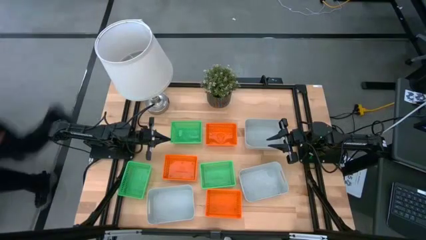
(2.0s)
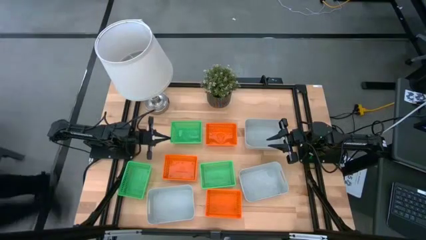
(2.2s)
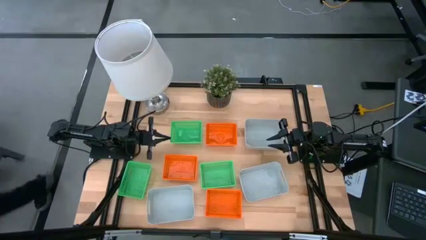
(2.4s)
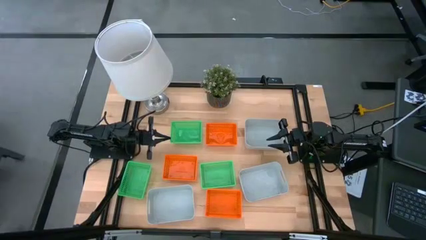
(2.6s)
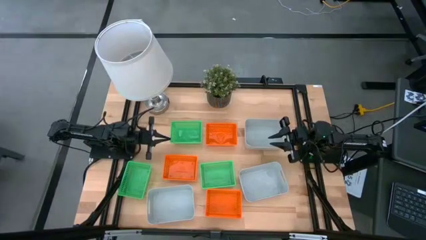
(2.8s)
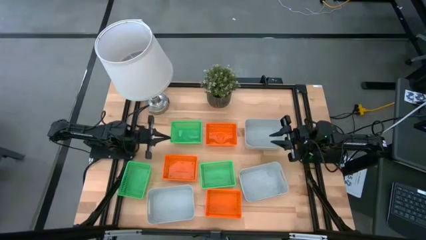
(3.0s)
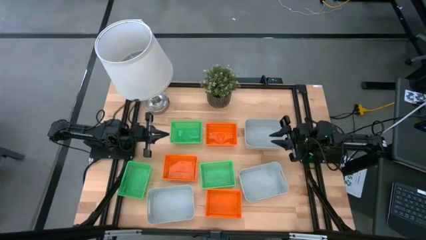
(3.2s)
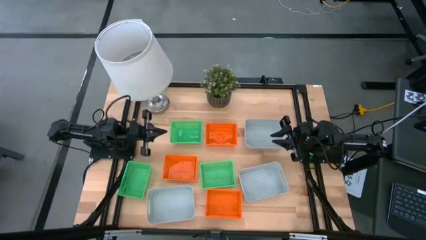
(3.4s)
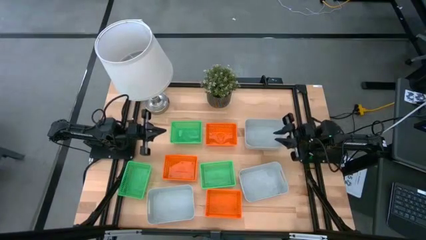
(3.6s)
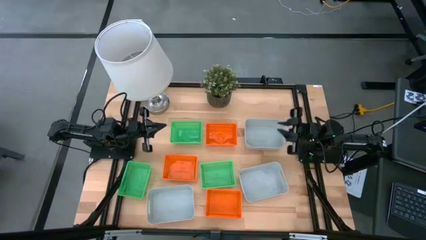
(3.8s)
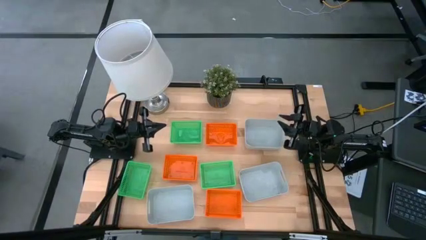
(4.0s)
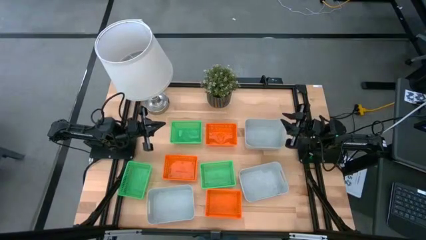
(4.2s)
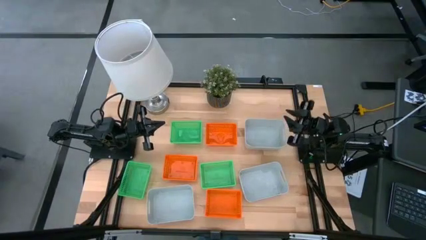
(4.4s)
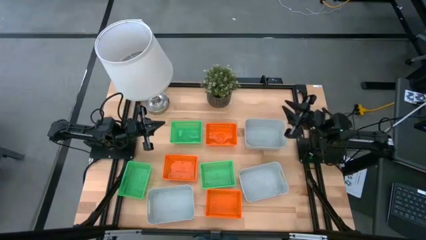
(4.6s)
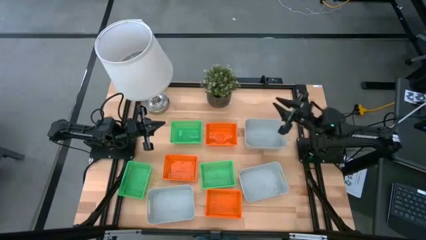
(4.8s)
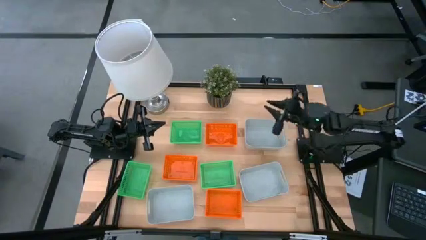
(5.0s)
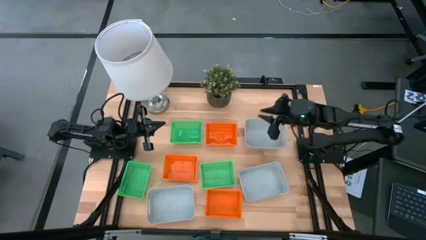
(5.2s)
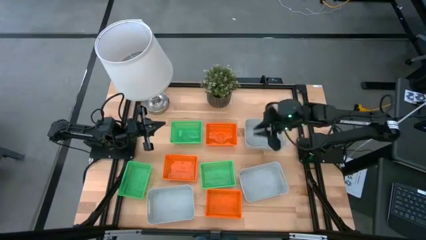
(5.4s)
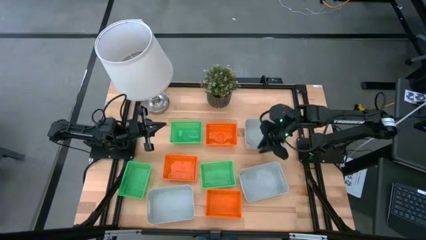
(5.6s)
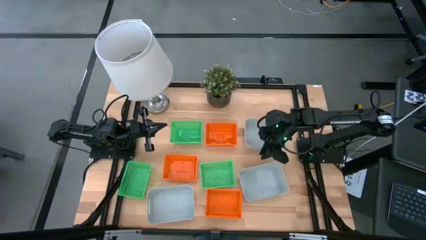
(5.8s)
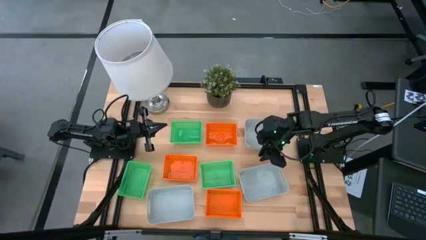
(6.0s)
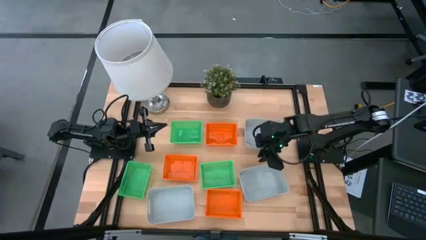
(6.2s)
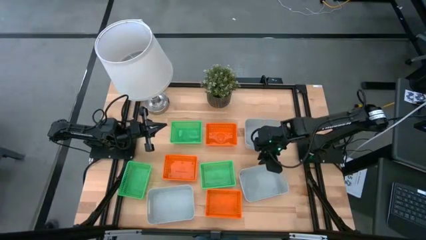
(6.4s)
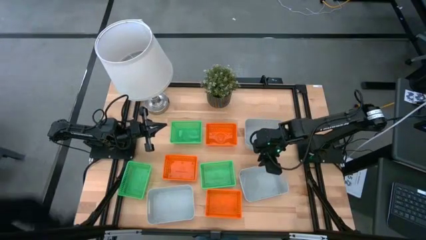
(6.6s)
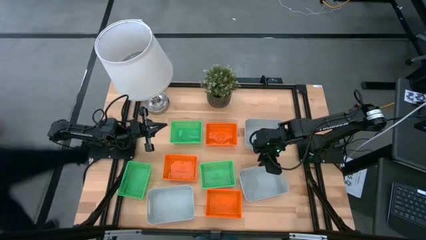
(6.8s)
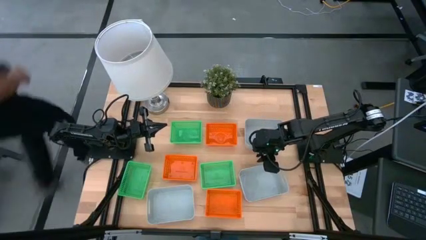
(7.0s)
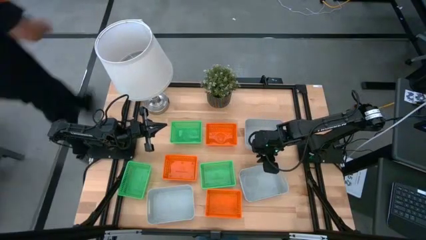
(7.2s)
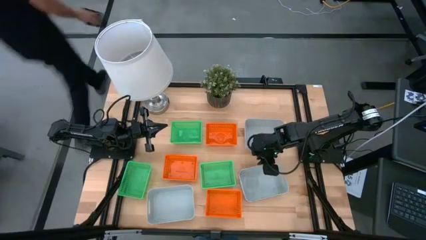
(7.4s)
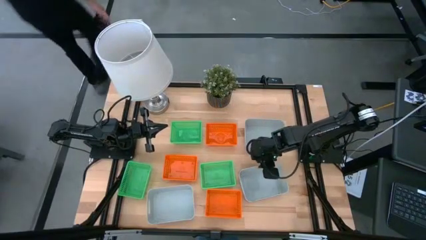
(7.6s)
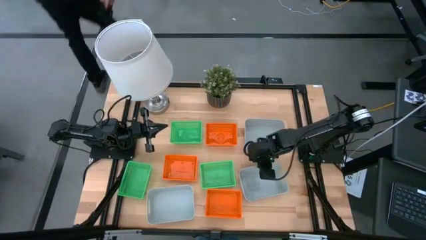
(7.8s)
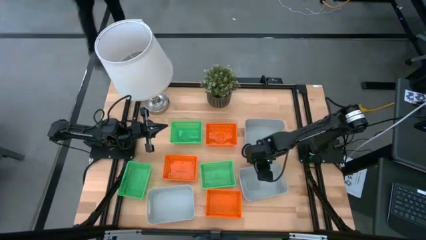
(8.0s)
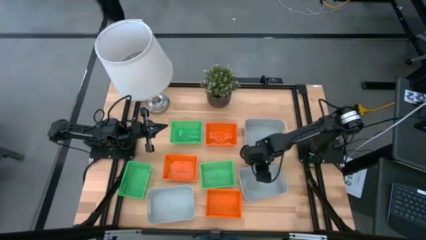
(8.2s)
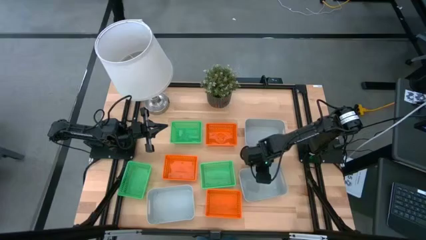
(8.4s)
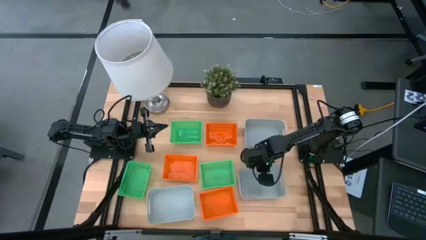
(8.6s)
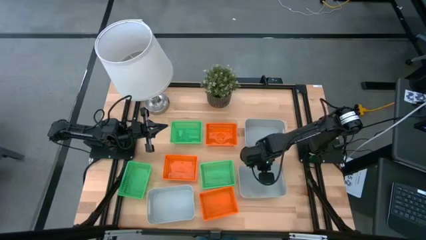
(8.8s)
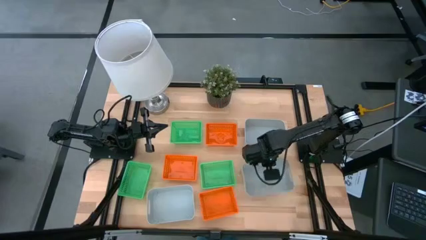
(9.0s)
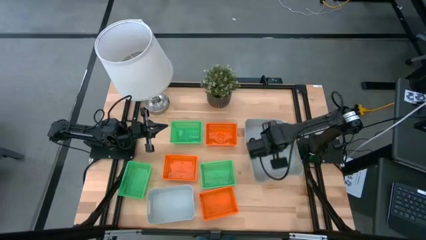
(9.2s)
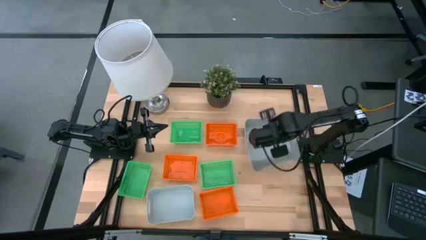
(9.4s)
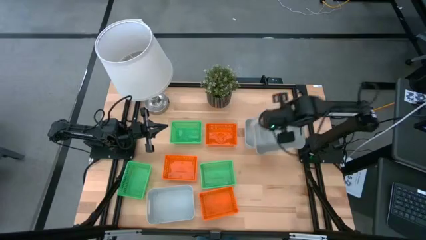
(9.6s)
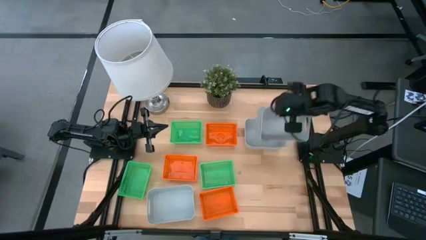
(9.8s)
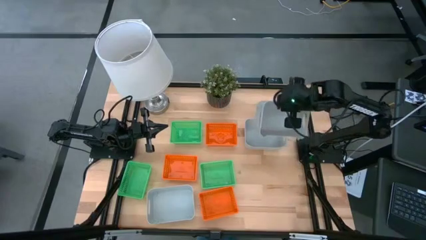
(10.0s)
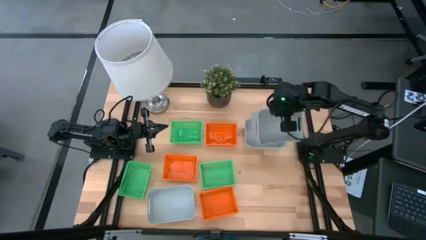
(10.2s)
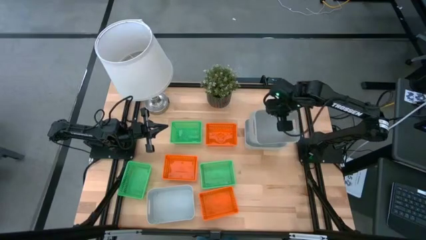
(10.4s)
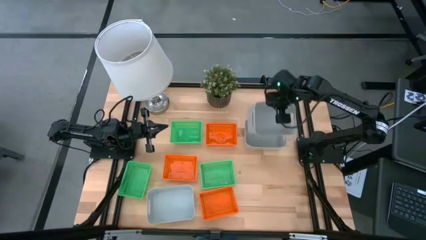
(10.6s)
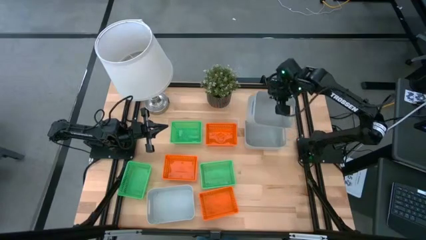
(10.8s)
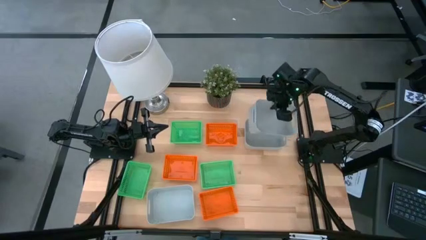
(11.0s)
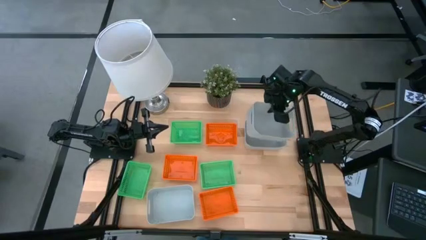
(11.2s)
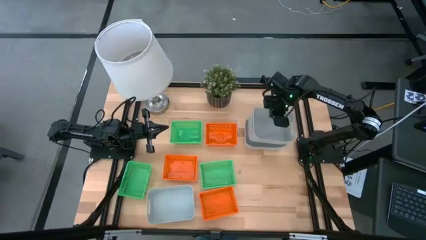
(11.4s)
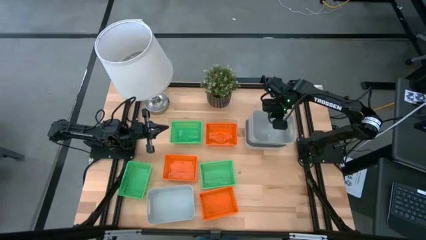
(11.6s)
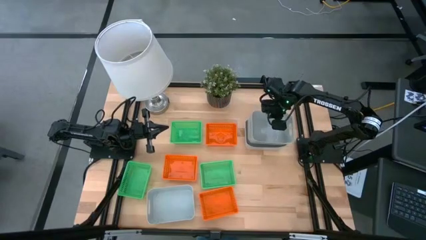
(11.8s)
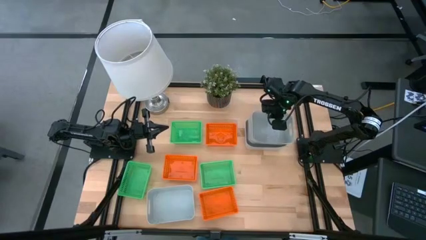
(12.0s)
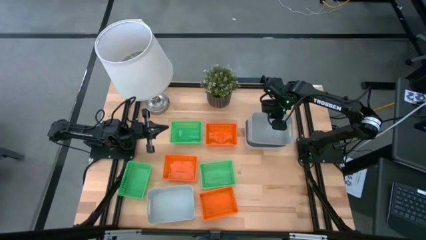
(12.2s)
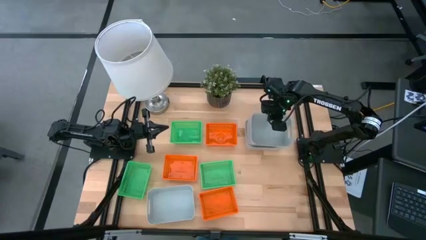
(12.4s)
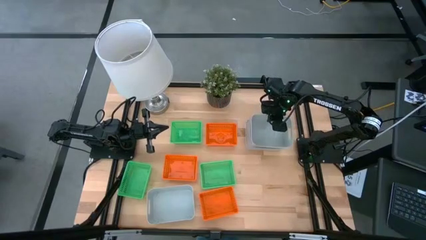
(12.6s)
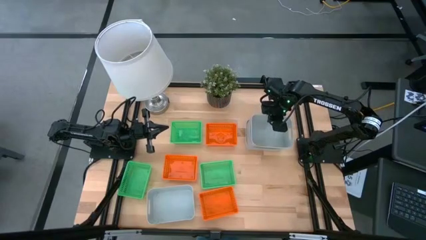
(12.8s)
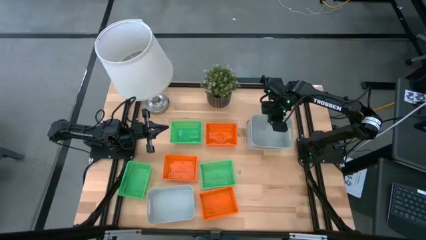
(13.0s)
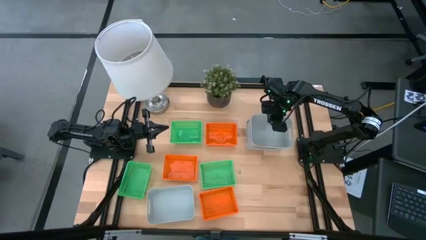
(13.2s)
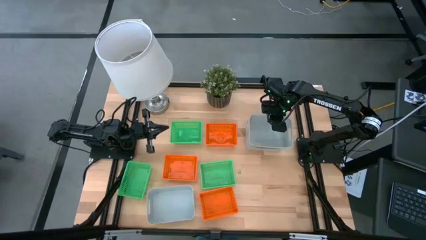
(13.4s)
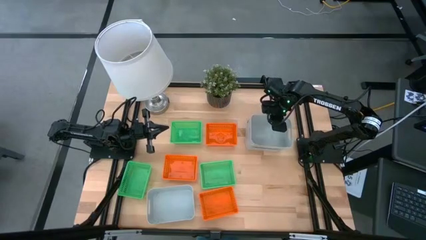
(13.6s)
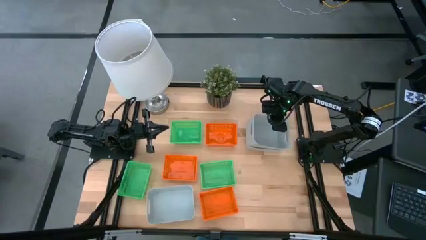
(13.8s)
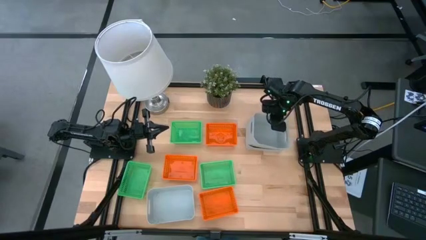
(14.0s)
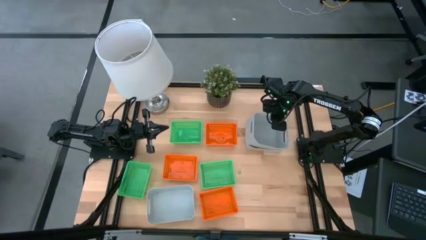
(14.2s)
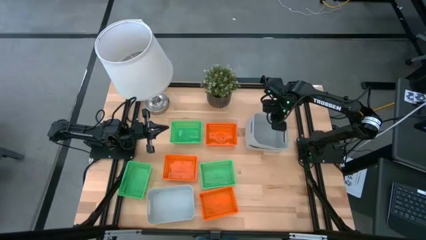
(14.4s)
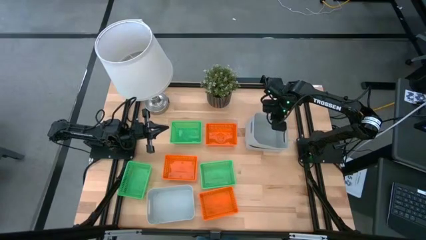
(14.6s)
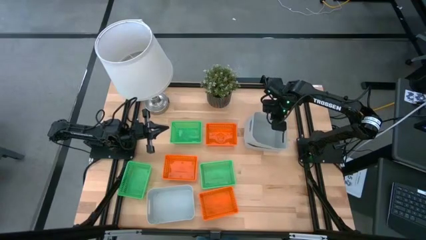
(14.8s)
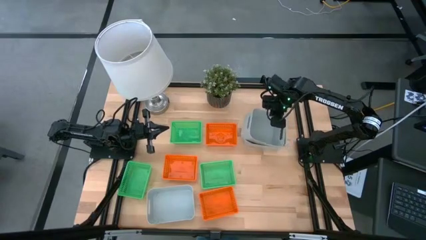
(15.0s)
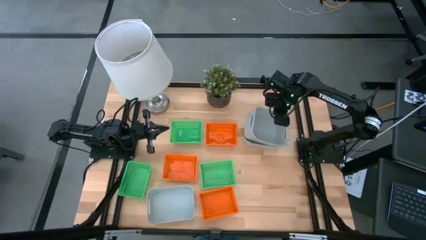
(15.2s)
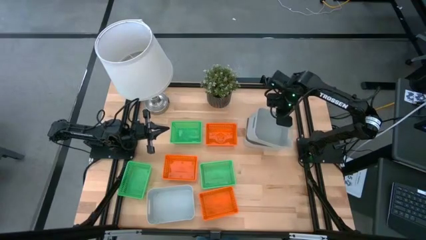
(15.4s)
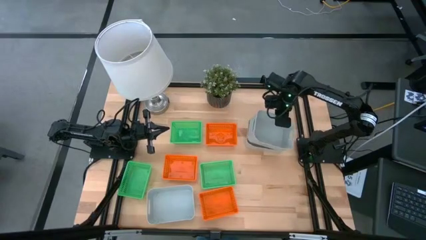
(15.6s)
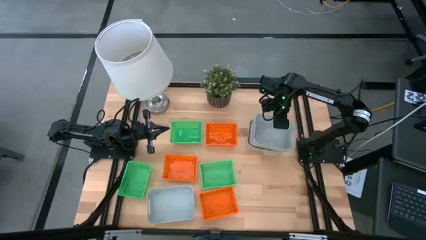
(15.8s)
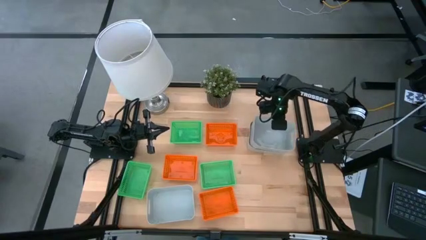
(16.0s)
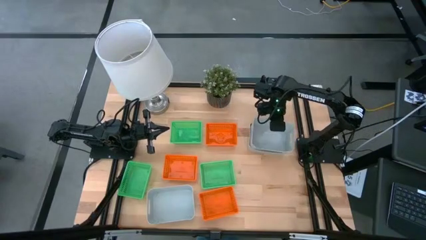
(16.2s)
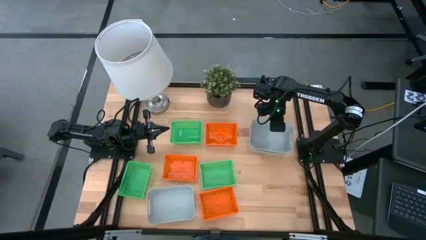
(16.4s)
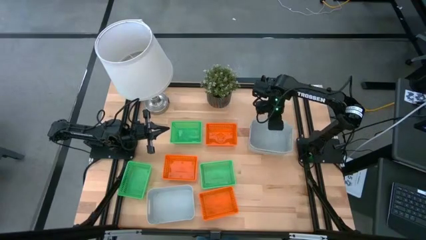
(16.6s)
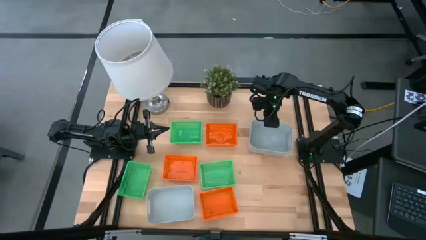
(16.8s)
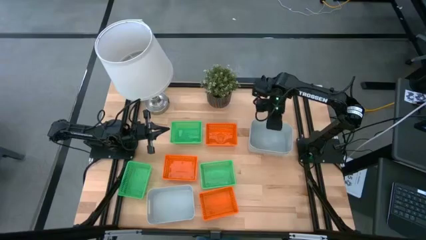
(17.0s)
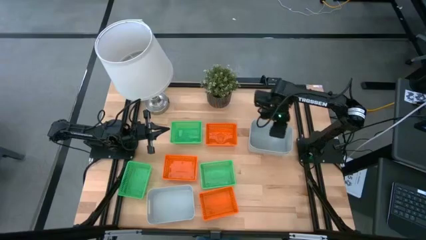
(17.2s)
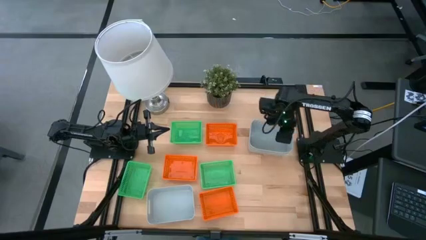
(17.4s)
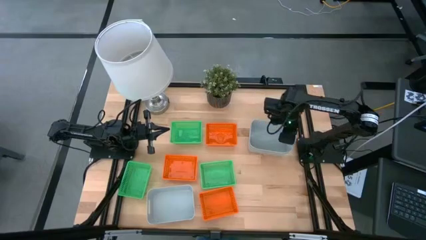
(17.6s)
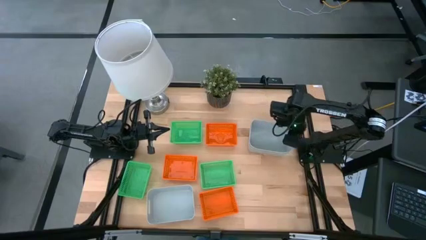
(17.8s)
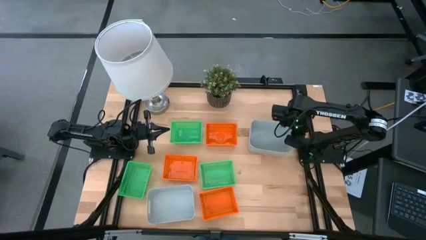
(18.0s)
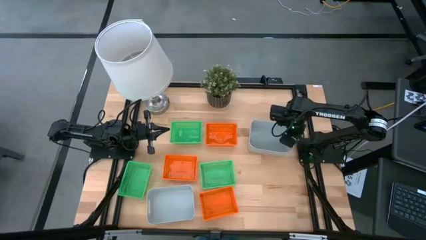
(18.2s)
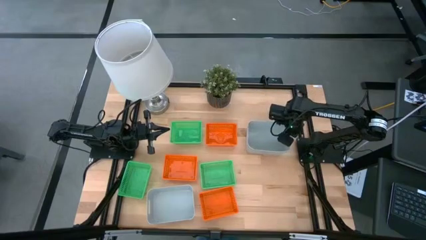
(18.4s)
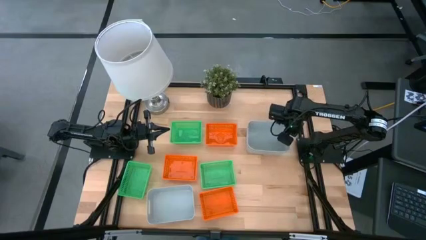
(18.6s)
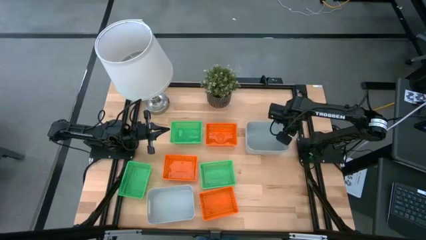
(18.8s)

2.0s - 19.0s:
Stack the bottom right gray bin on the top of the gray bin
